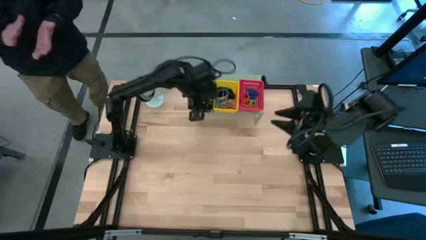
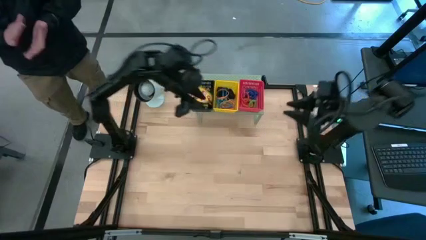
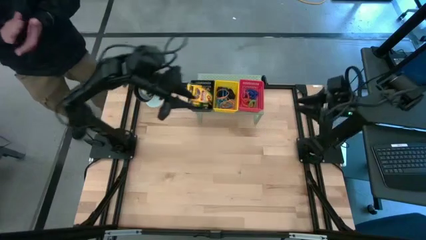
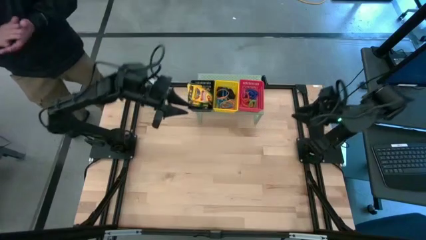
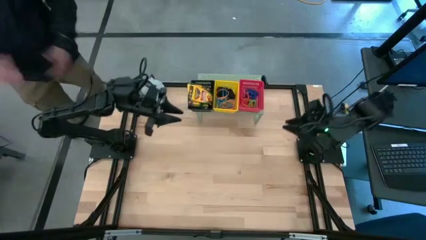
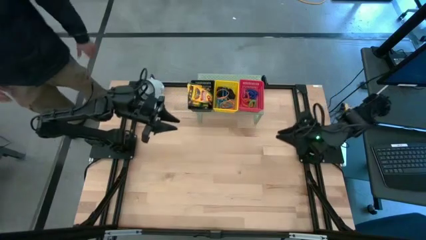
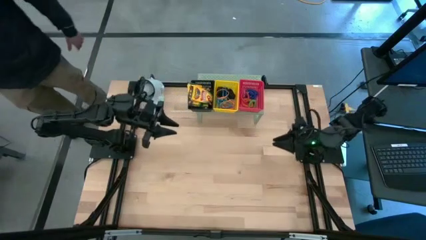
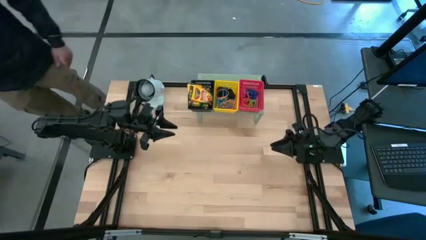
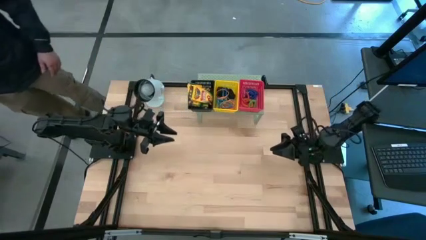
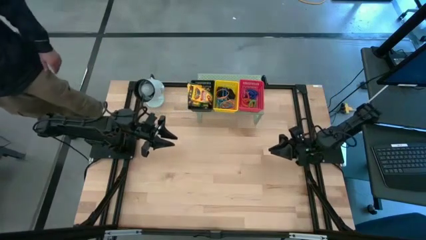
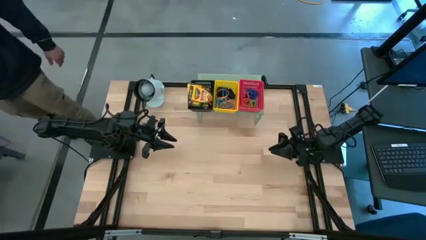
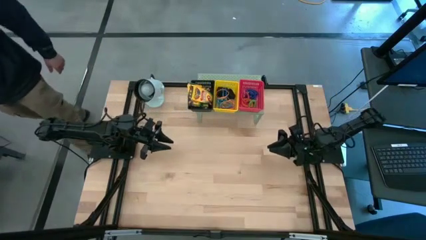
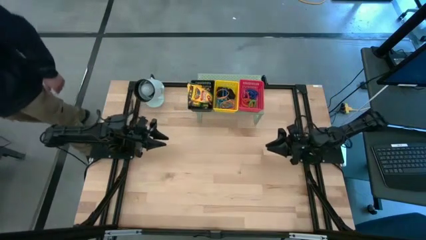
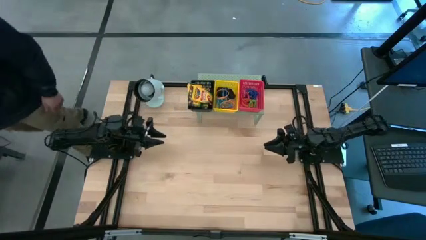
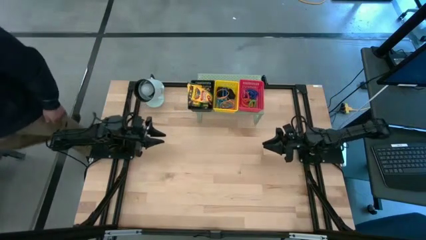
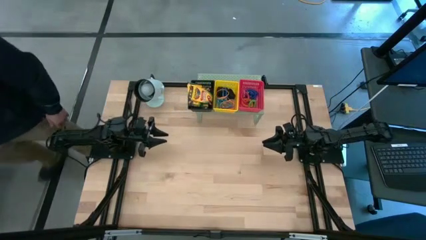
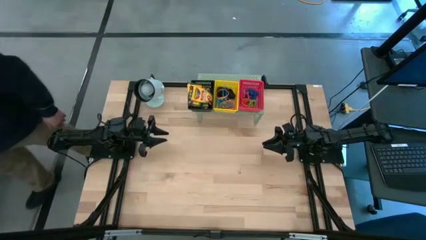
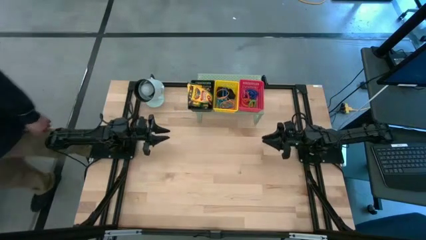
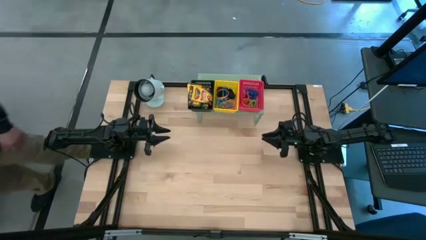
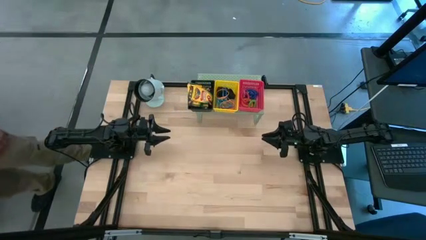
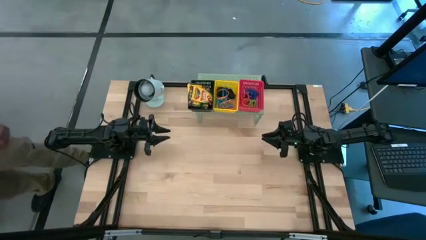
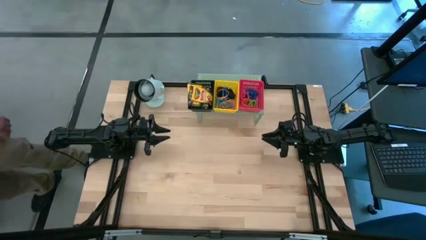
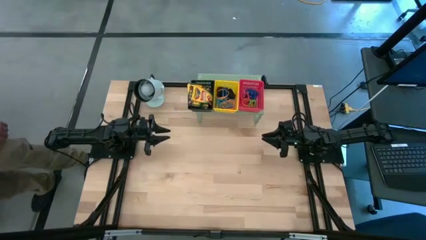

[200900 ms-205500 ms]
Task: Pick & Place Office Desk Supplies
Return to Home Position

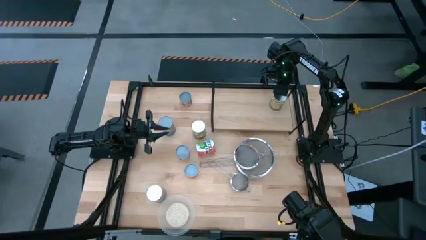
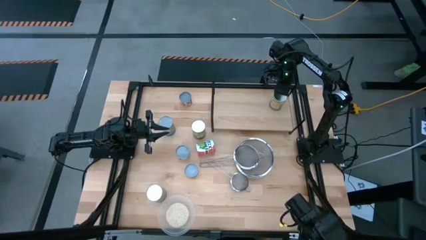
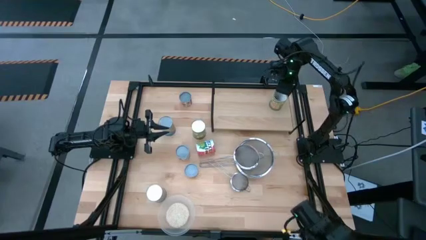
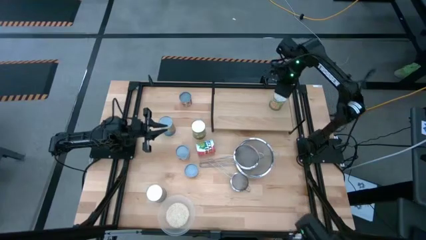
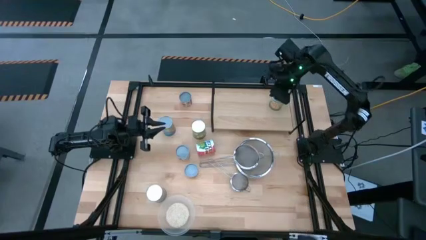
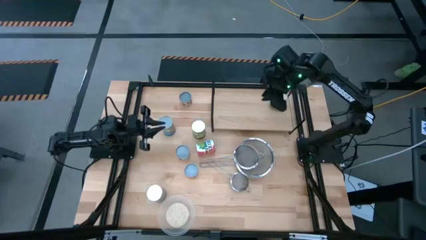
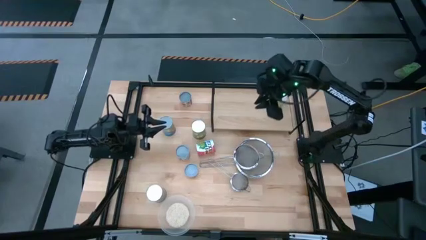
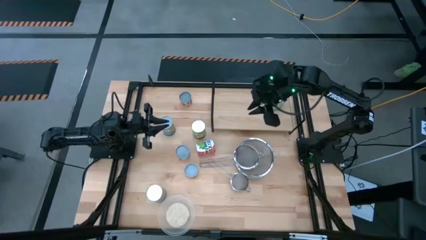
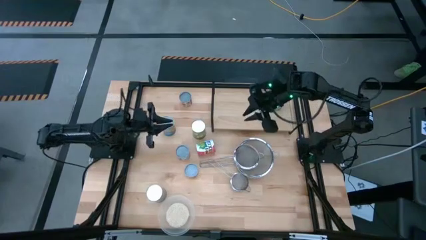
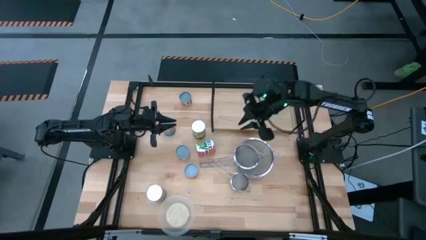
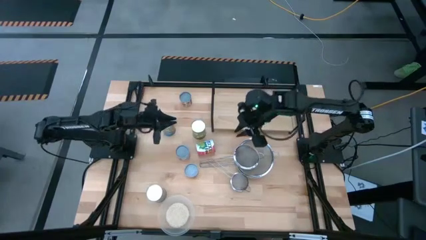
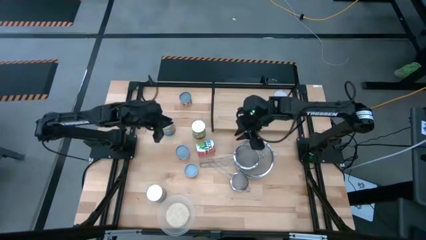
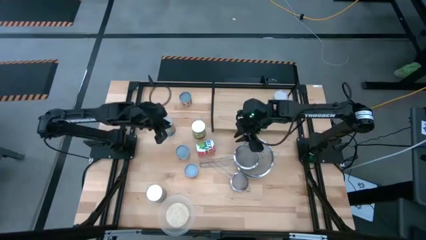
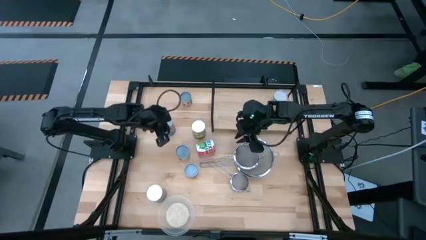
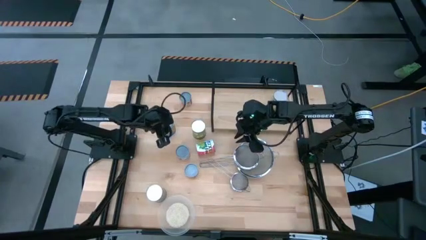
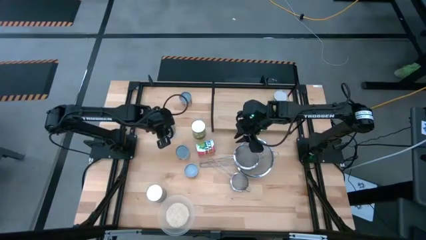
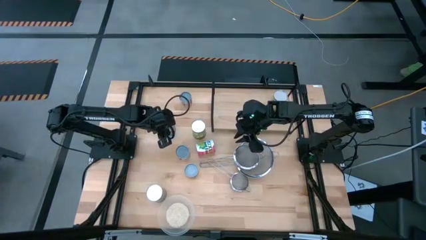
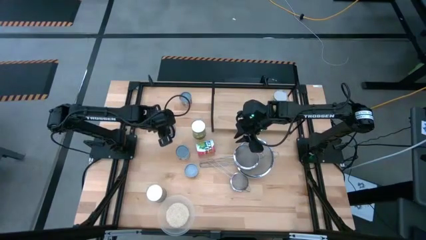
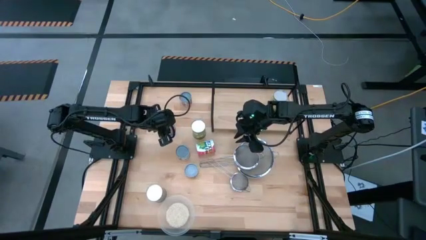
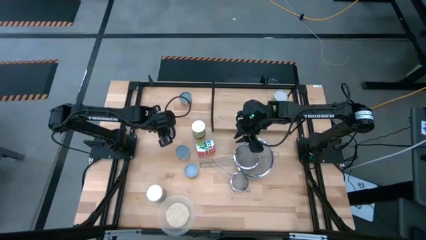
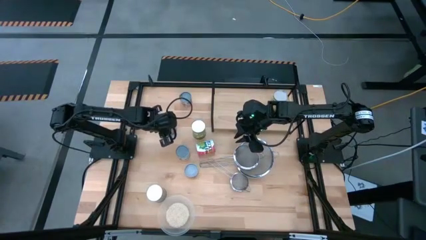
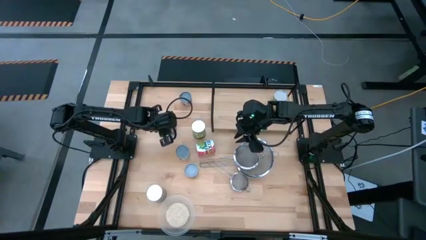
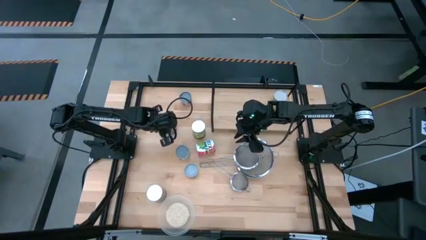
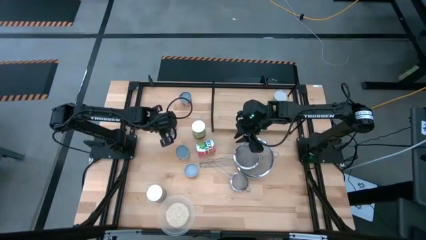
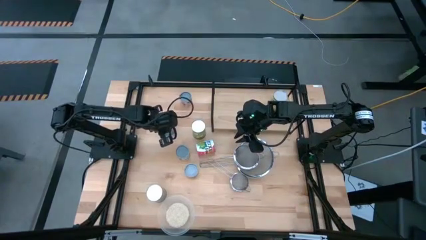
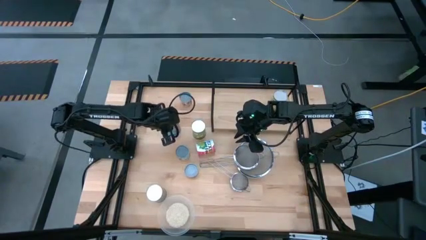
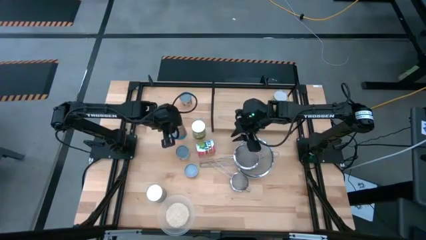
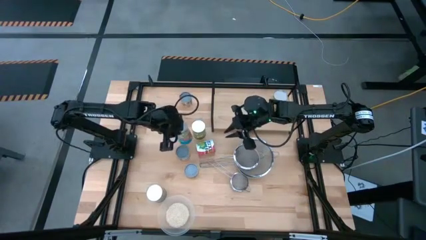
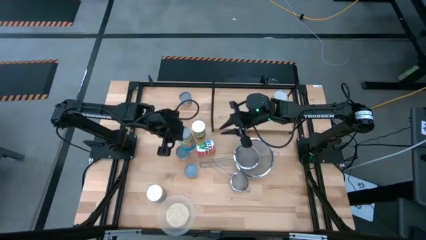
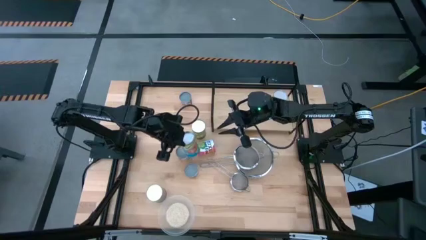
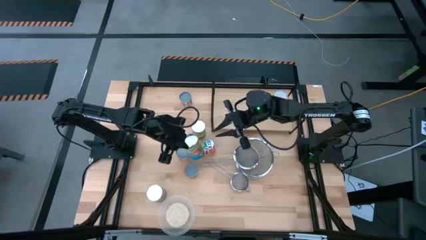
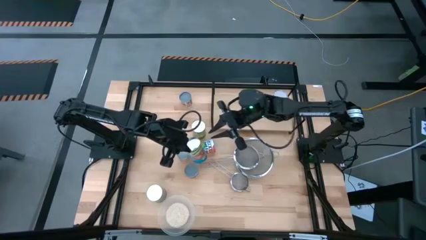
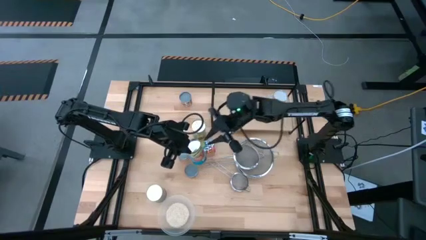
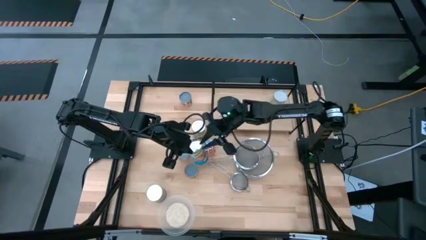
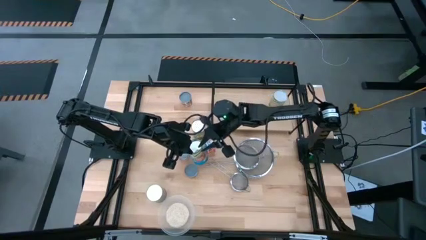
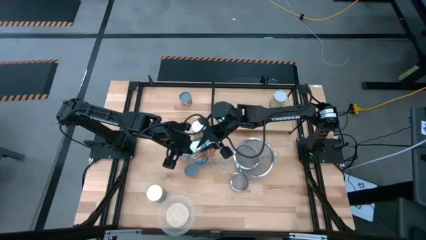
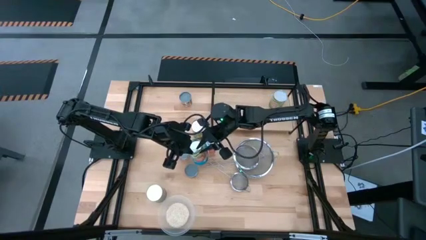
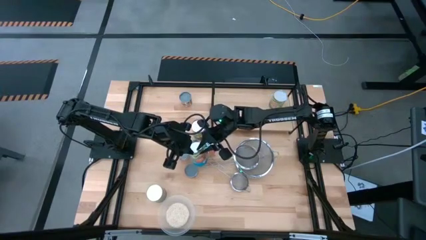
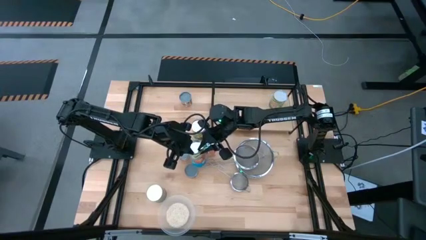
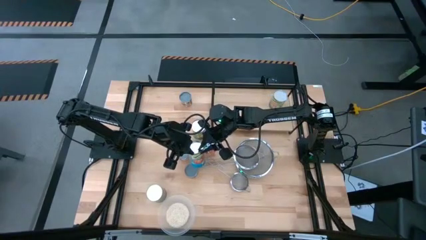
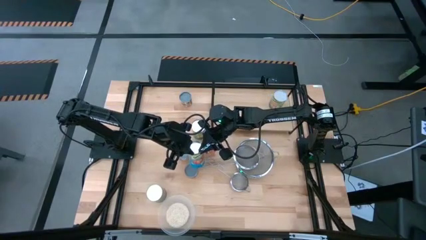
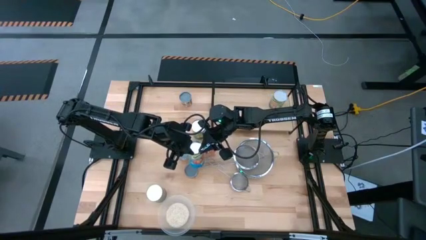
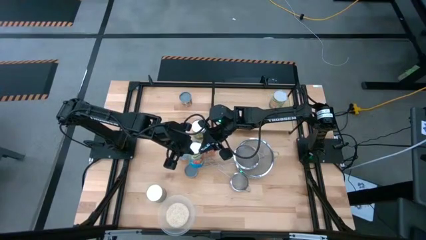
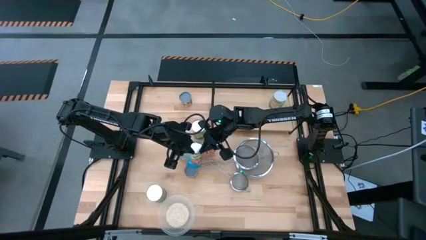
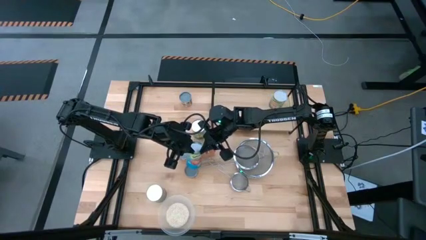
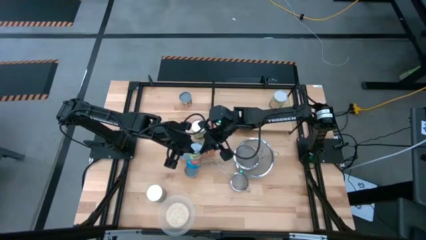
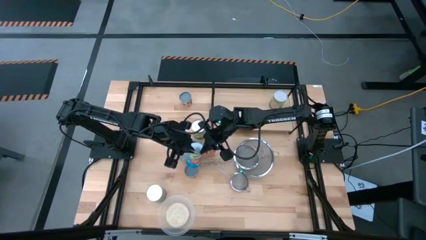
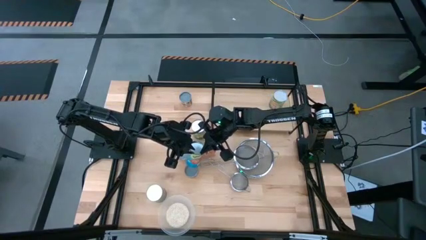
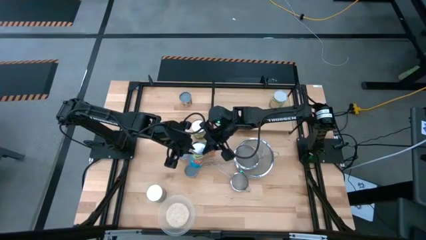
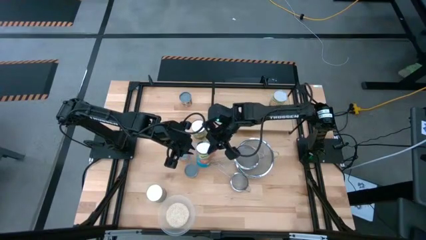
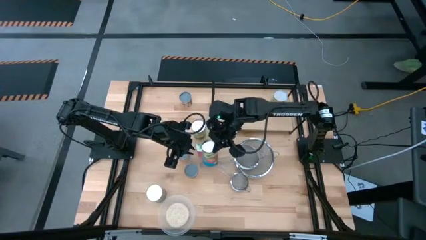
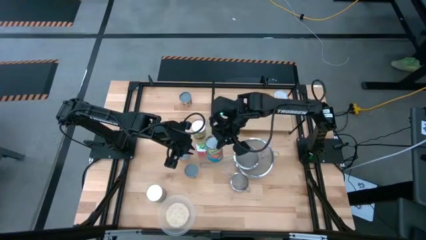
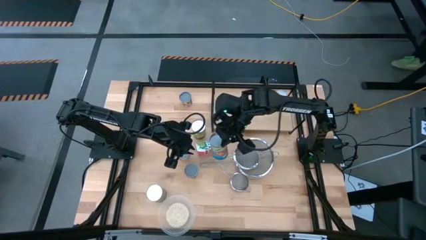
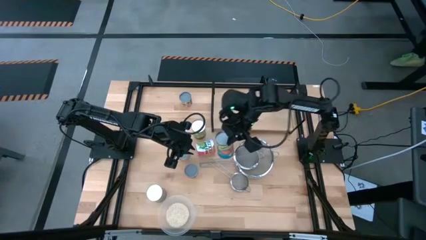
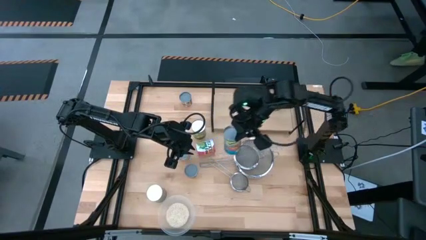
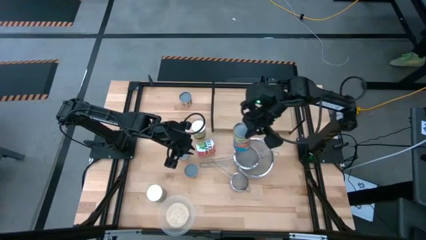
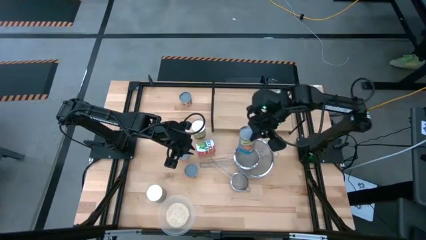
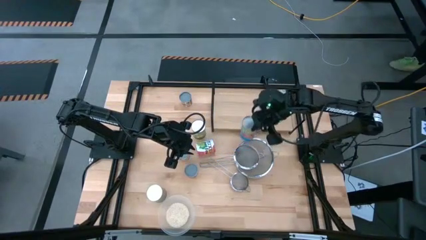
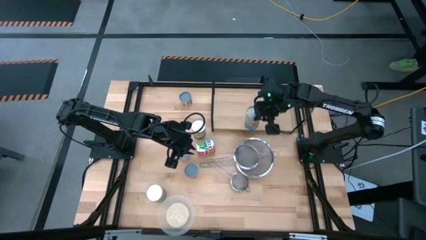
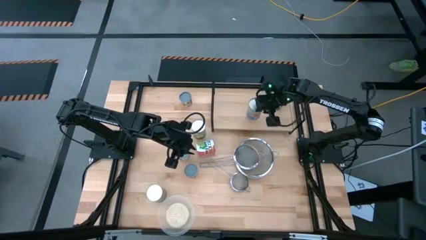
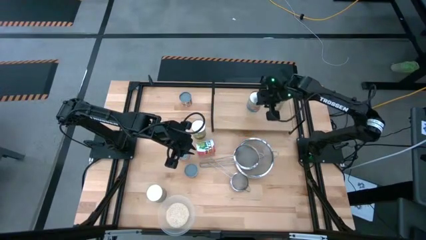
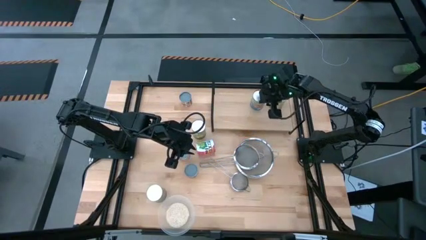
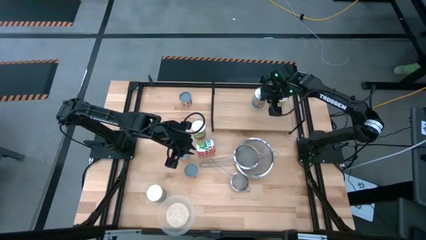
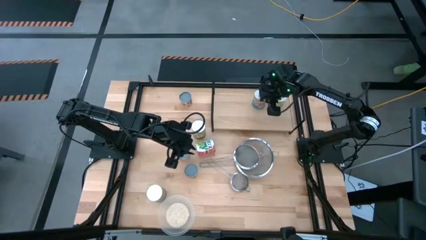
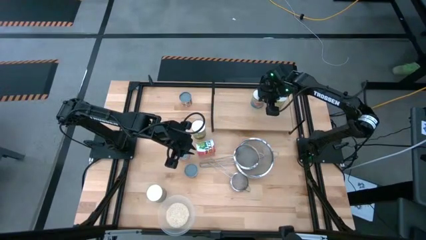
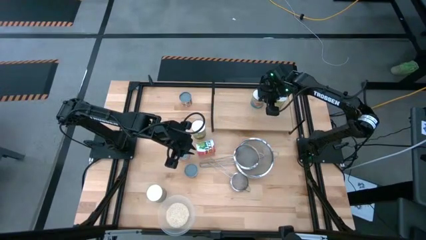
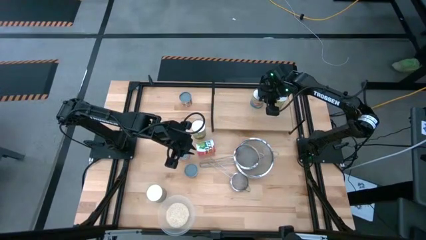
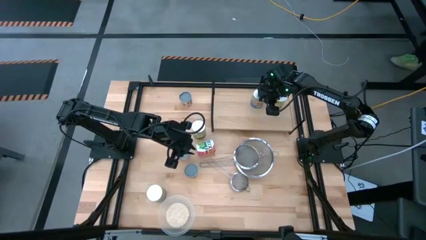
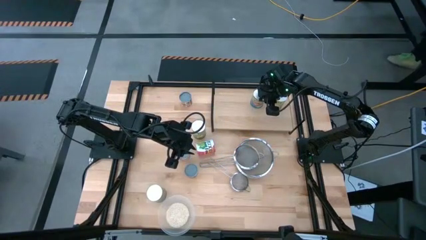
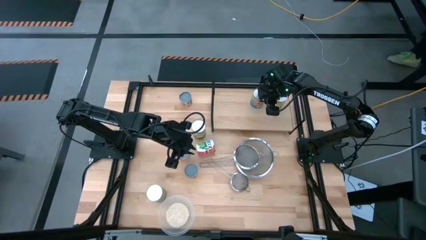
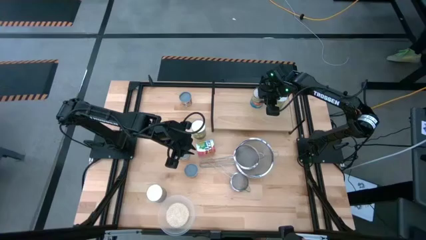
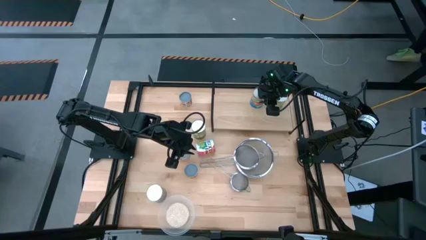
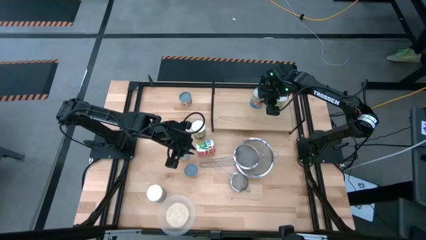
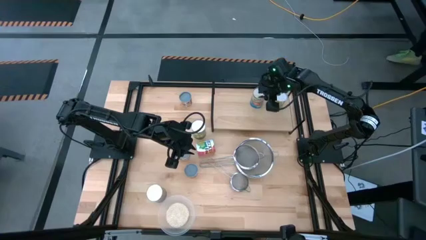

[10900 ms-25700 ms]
Task: Pick and place cans onto a shelf
Put the canned tomatoes on the shelf
